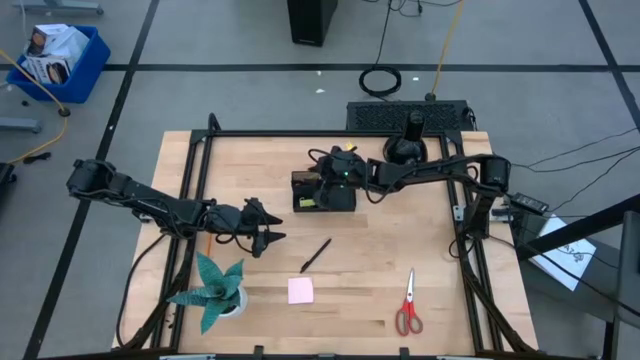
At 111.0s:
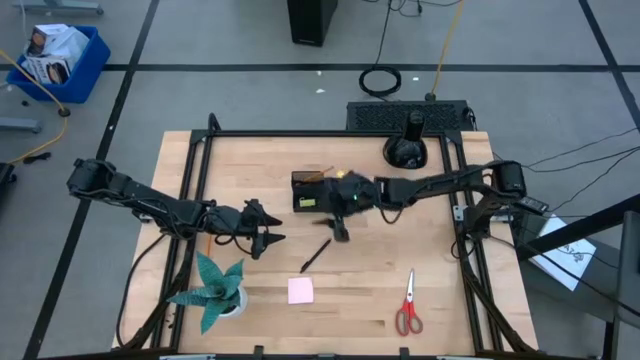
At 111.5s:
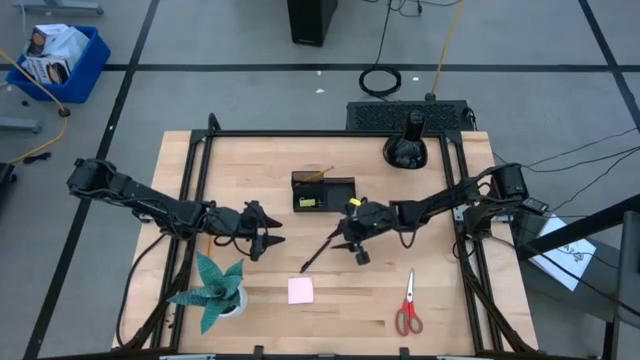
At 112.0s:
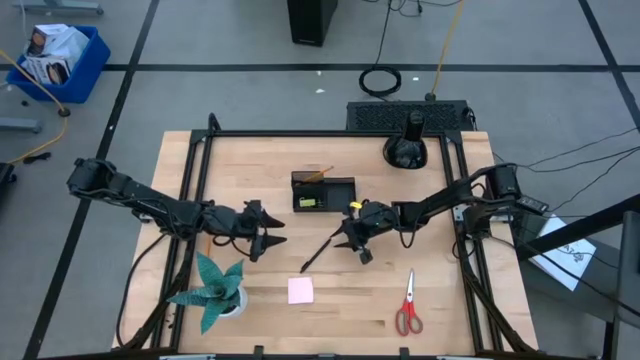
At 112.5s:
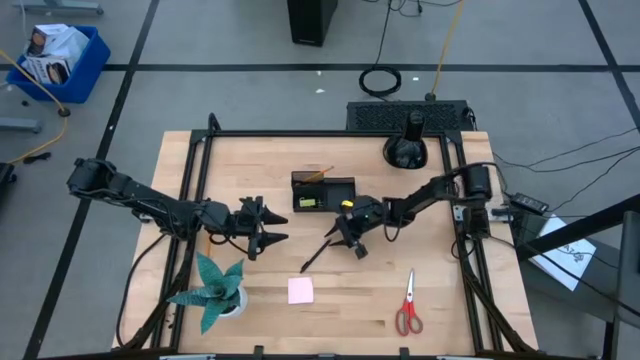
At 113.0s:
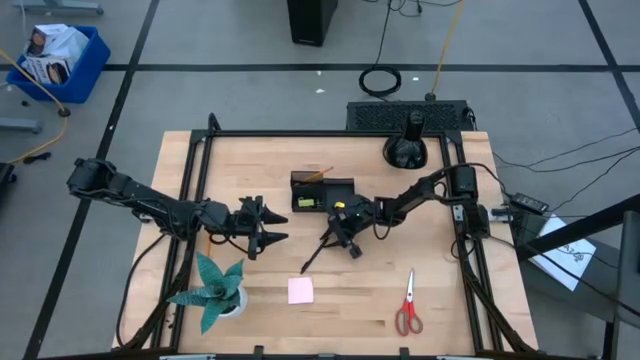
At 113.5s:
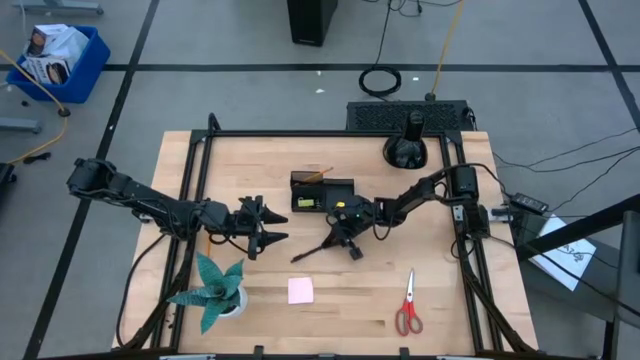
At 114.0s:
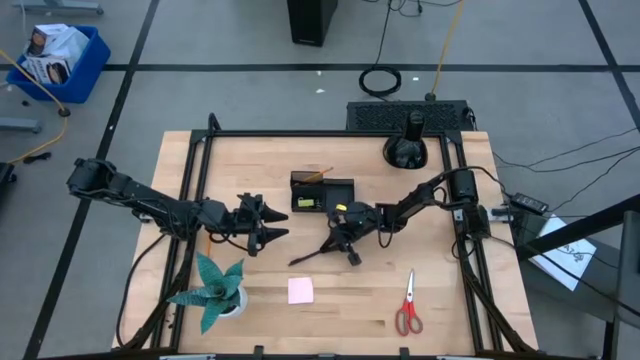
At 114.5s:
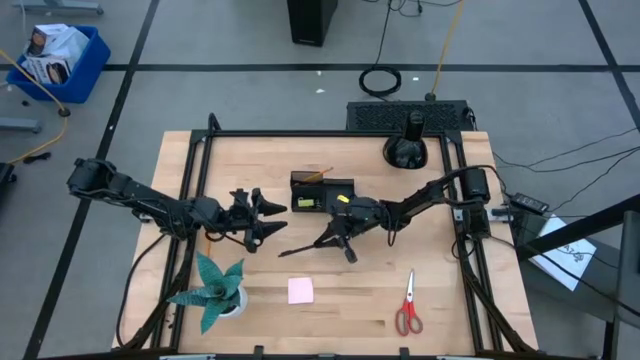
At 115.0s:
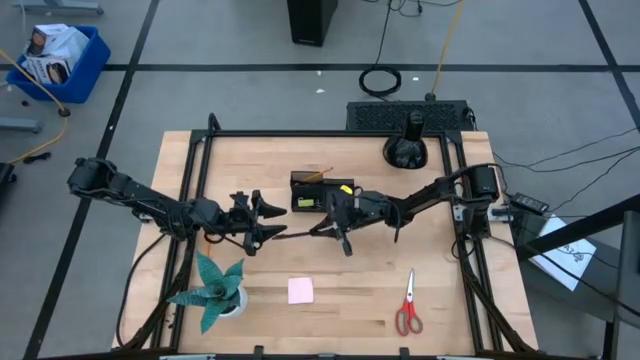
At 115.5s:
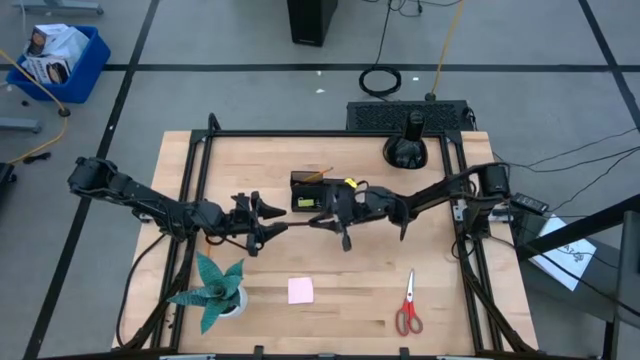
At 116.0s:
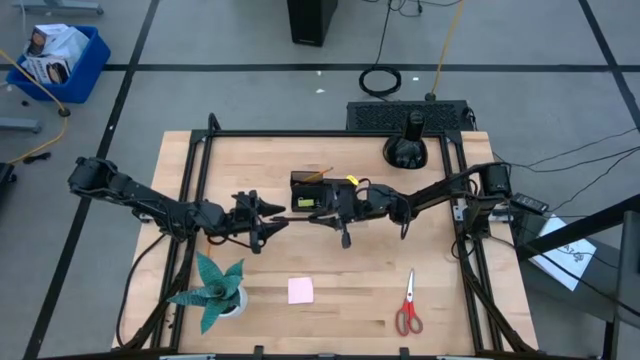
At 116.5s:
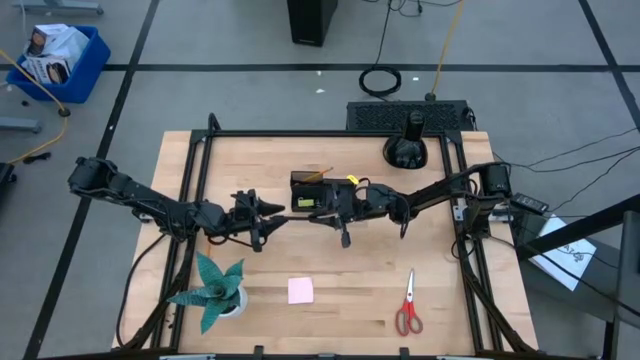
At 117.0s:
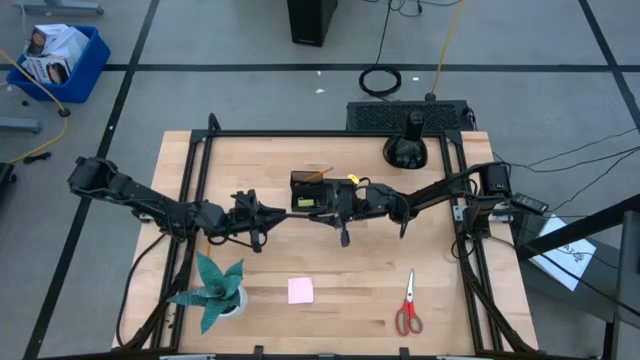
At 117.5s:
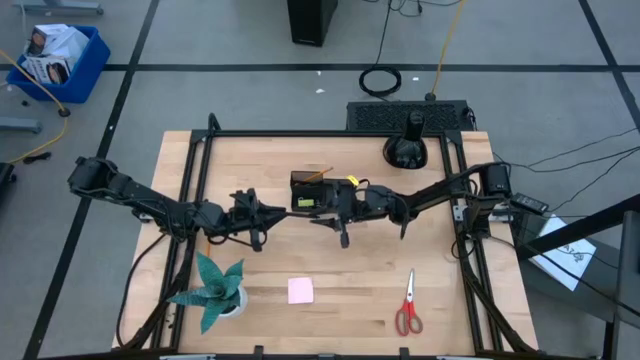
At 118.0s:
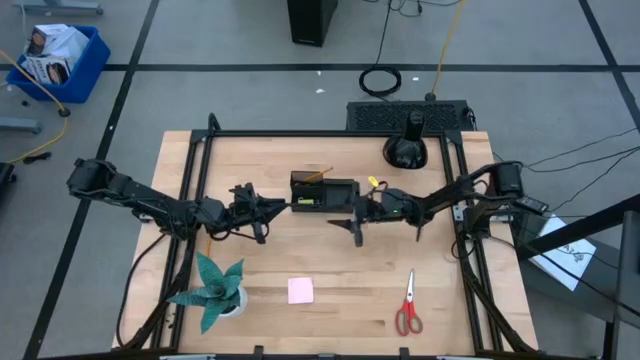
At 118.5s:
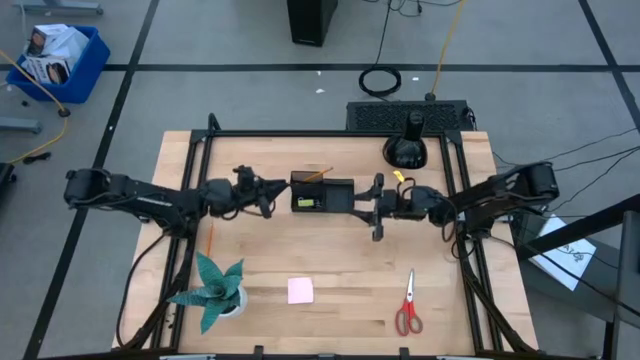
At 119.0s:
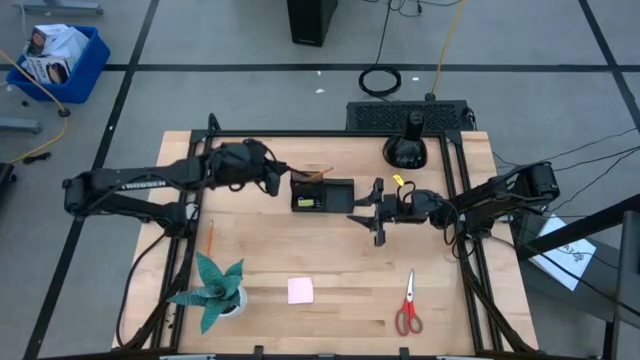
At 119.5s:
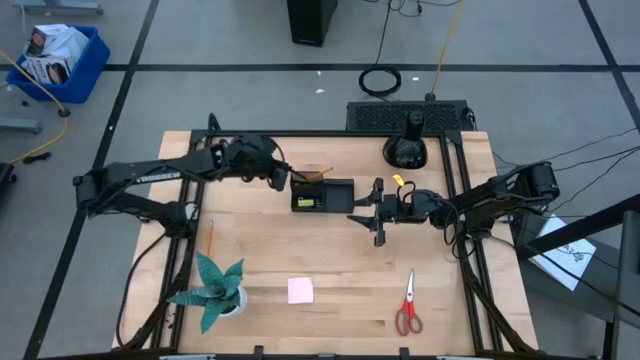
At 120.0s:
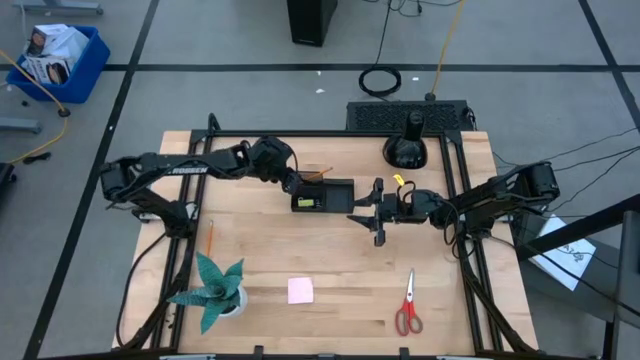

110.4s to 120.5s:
Task: Pick and place office supplies into organizer
Put the black pen into the black desk organizer

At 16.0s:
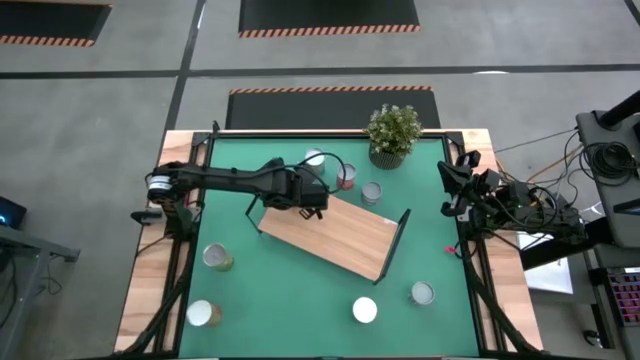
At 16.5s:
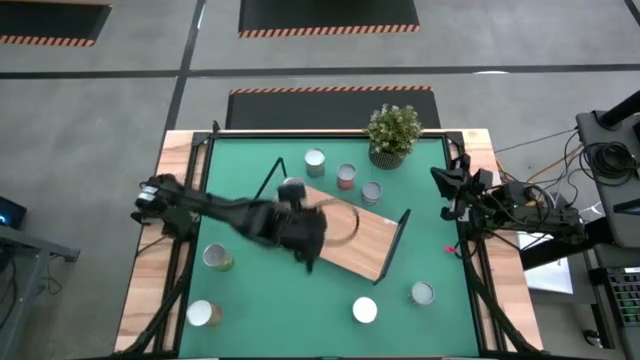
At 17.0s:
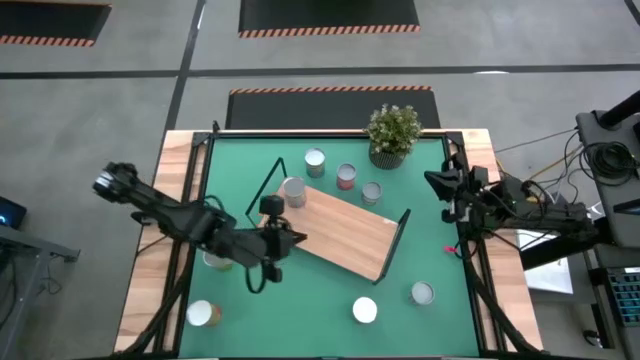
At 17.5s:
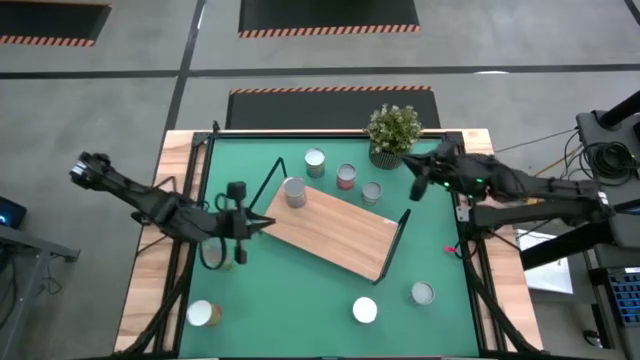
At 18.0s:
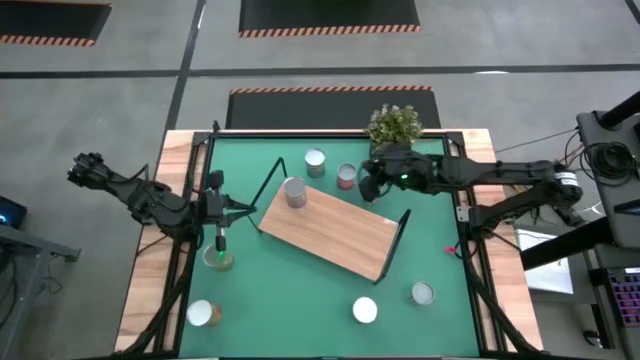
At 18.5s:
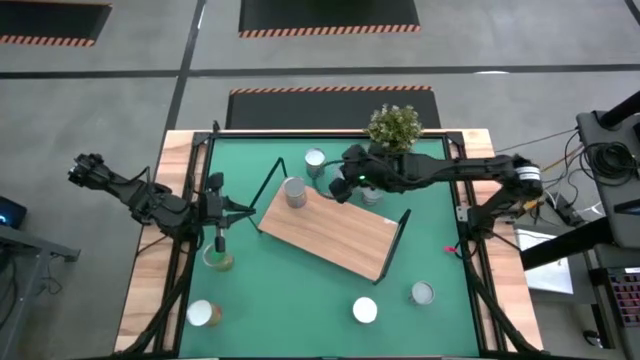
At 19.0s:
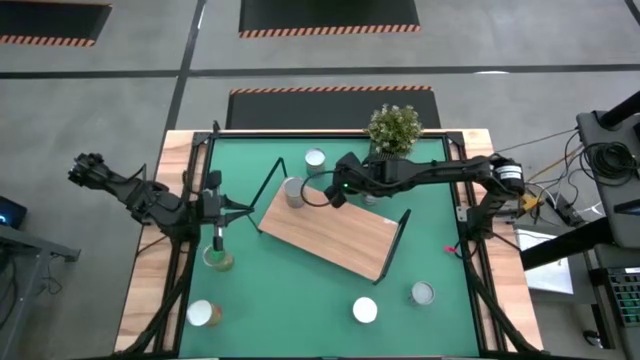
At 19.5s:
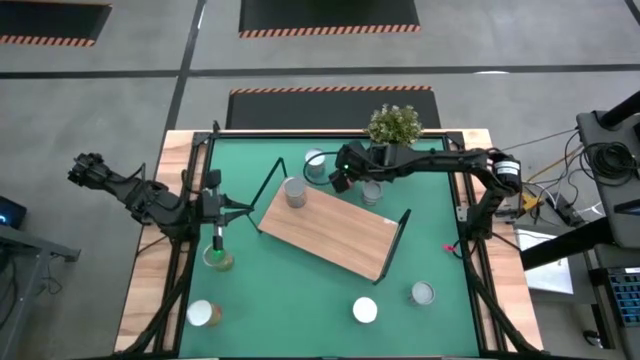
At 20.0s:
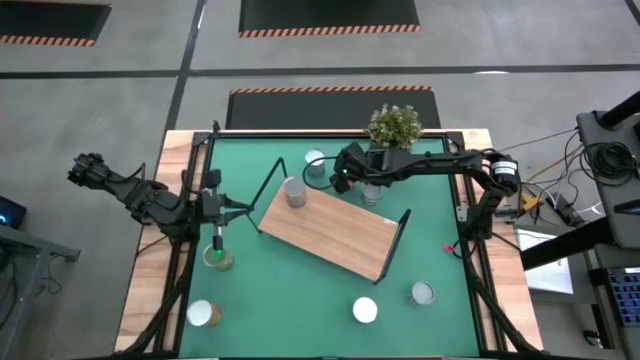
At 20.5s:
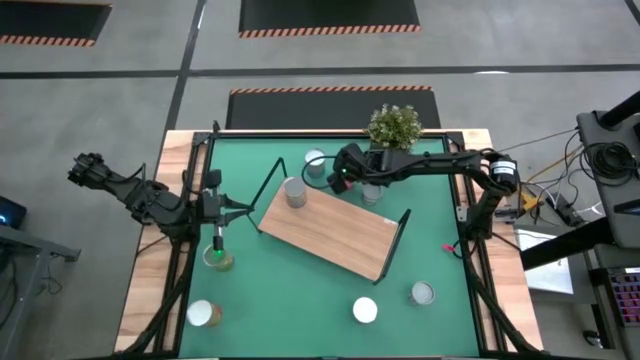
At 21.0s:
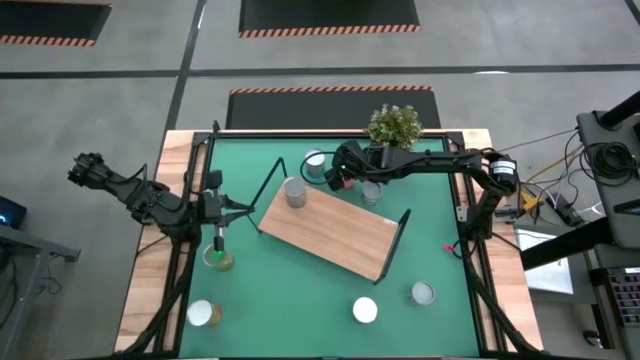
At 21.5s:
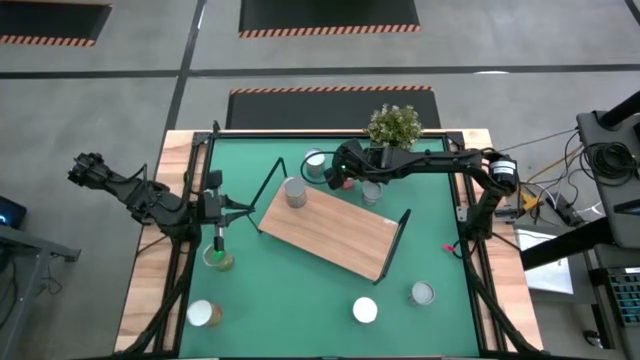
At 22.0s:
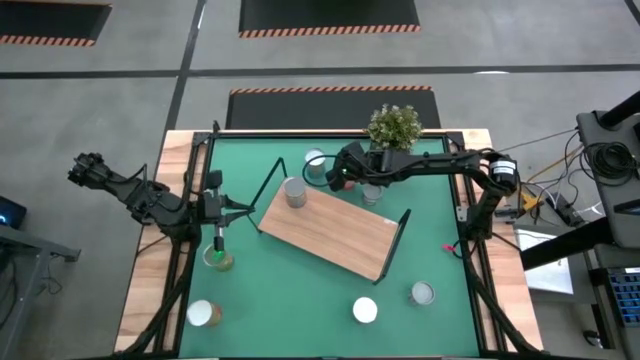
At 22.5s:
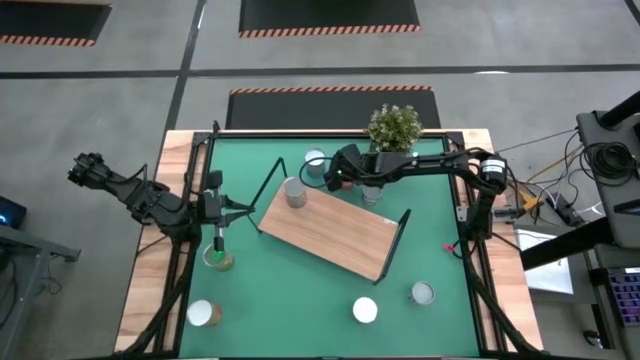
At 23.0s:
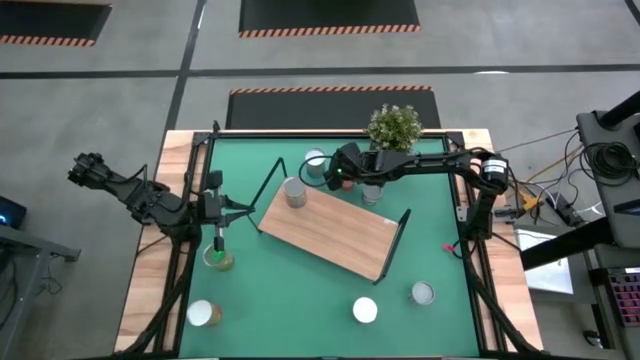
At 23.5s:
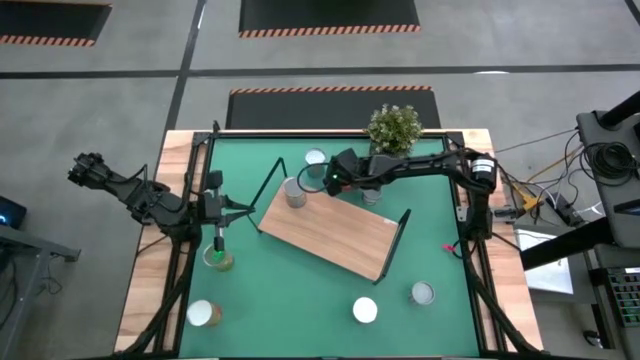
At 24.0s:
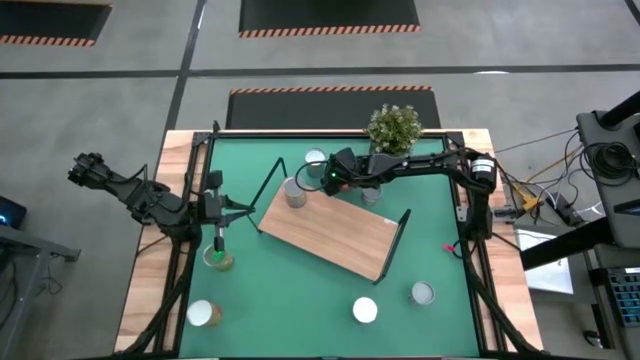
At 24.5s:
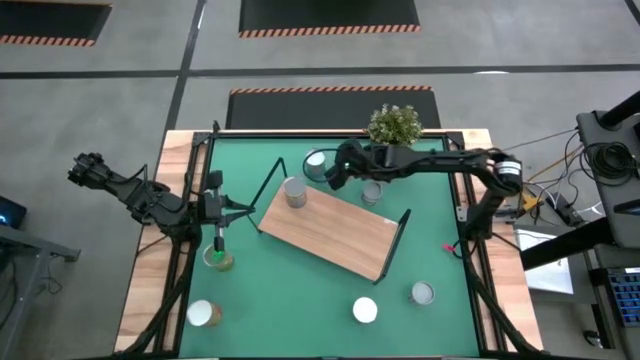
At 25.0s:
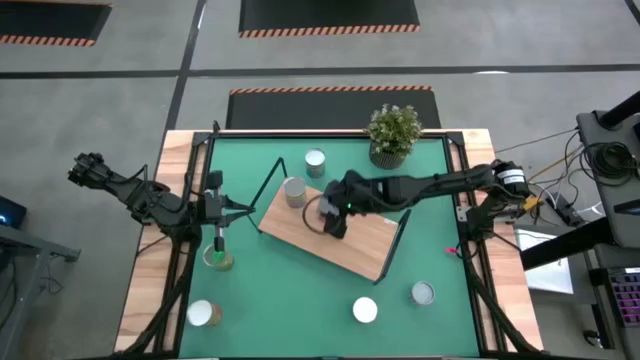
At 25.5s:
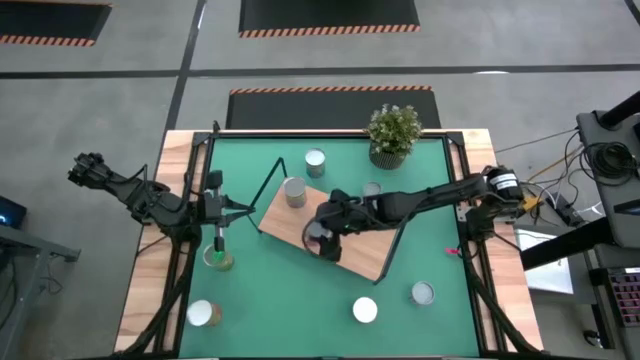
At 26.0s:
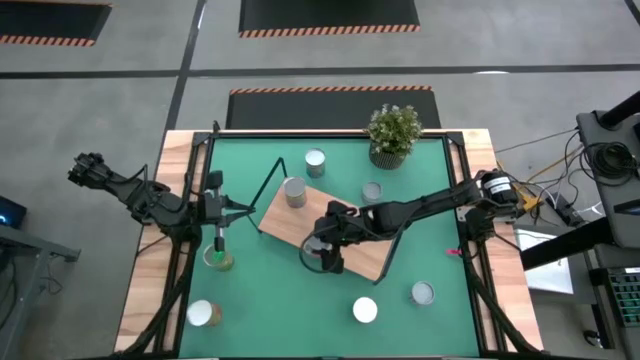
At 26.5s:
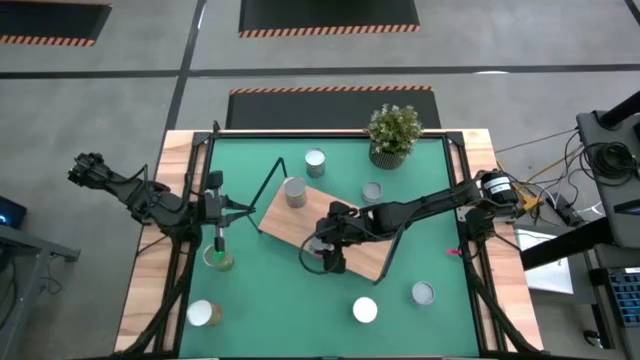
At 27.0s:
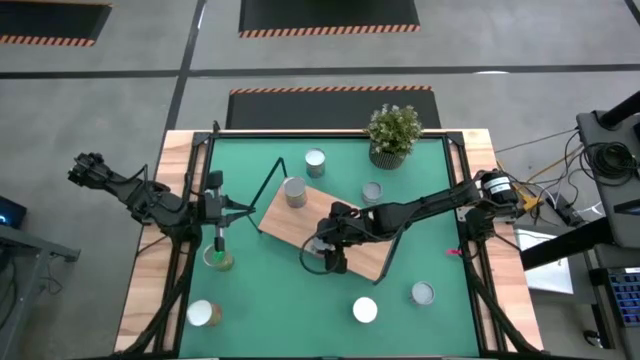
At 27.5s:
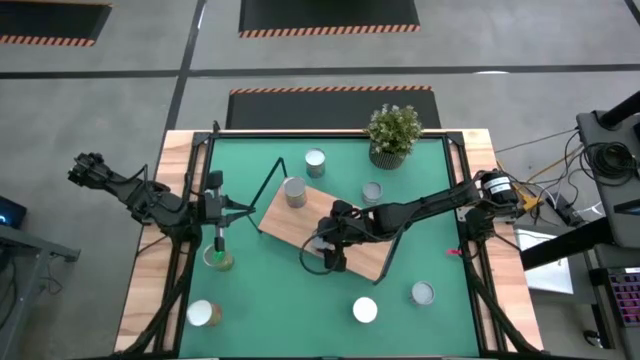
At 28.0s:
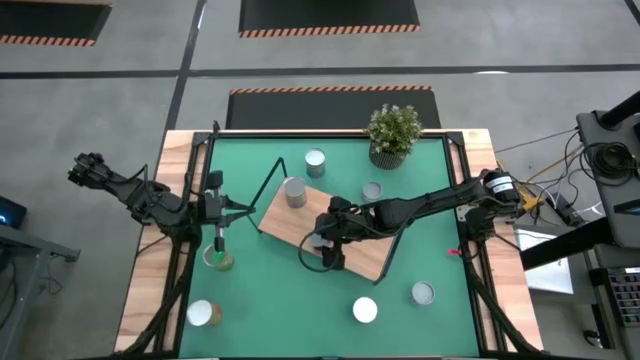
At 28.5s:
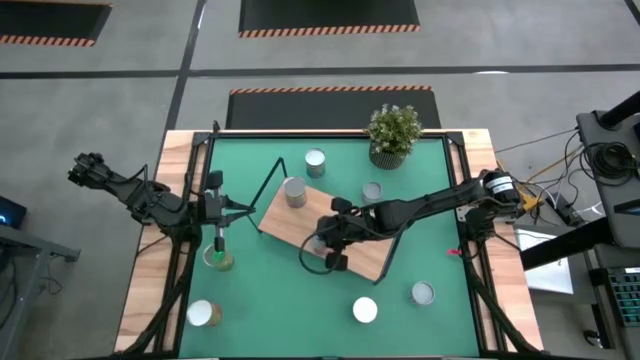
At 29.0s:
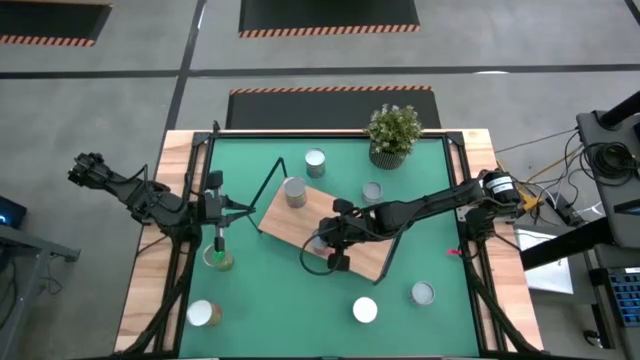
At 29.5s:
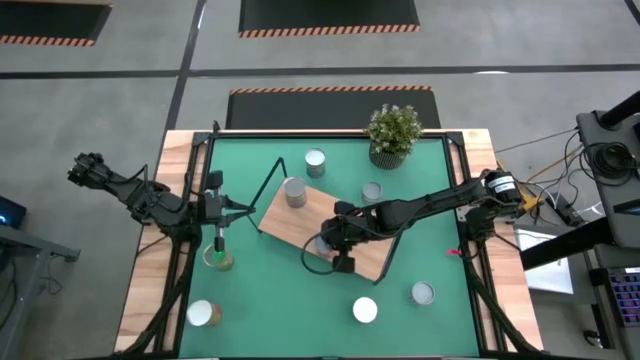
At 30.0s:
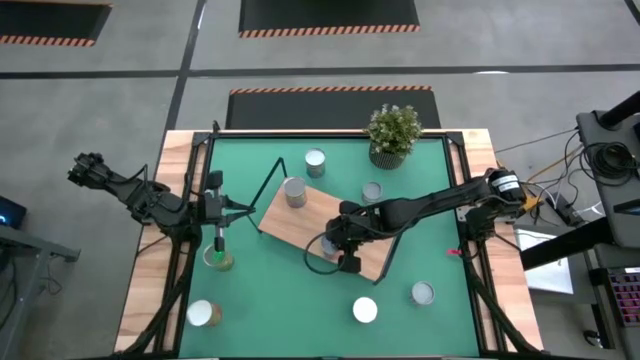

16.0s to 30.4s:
Task: Pick and place cans onto a shelf
Put the canned mixed fruit on the shelf
